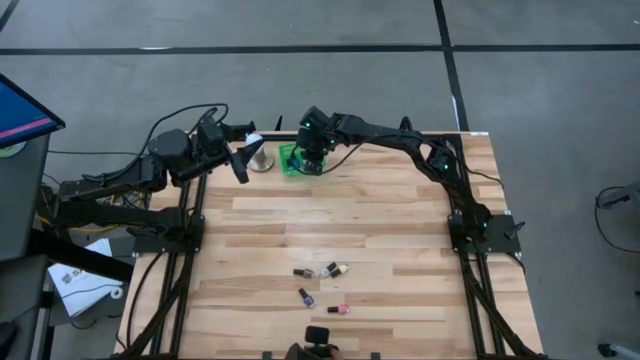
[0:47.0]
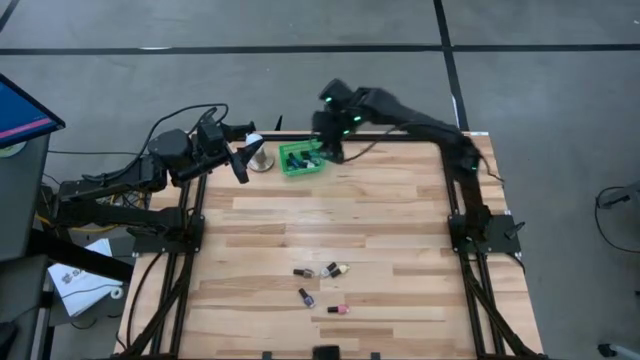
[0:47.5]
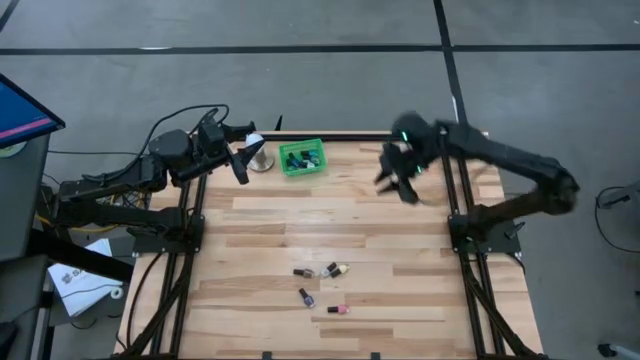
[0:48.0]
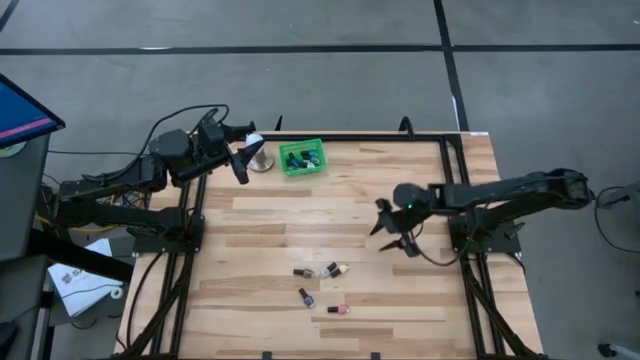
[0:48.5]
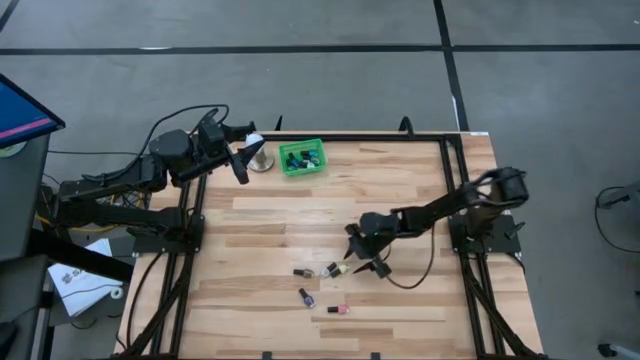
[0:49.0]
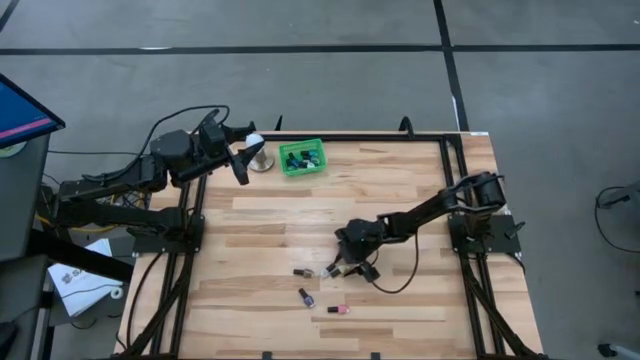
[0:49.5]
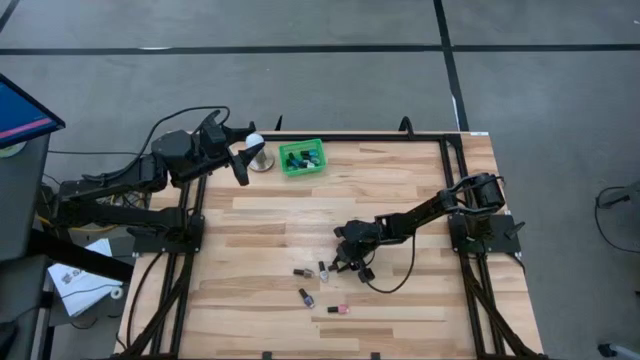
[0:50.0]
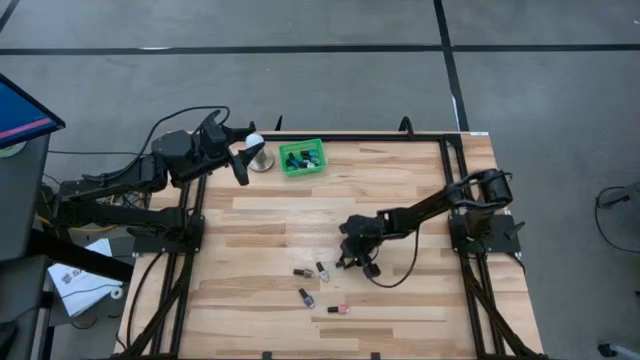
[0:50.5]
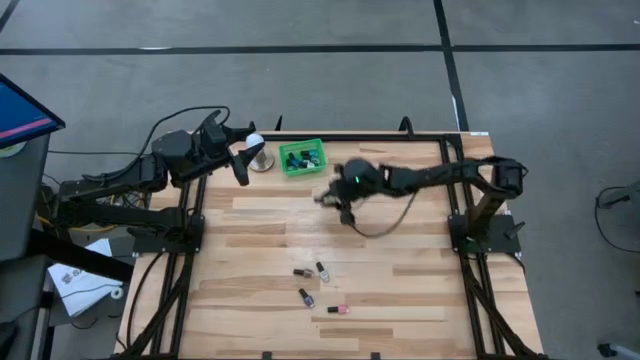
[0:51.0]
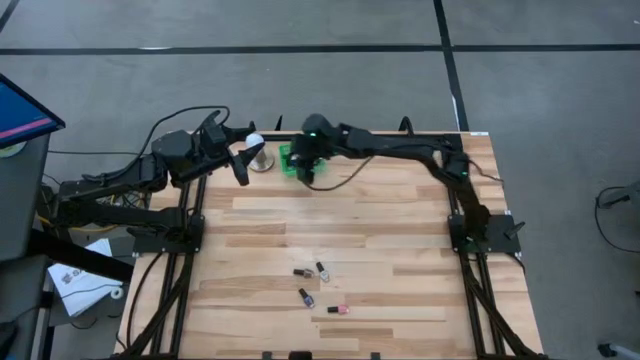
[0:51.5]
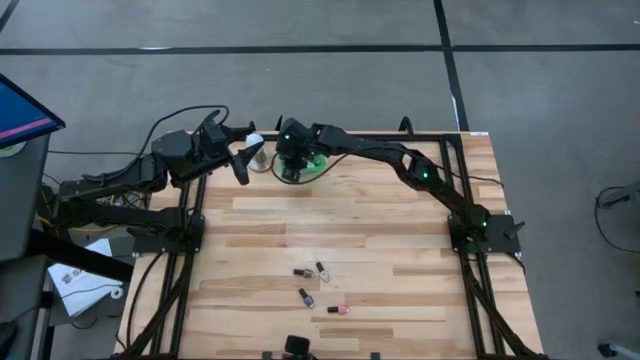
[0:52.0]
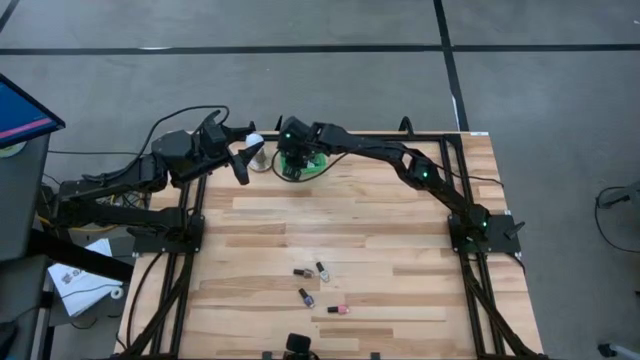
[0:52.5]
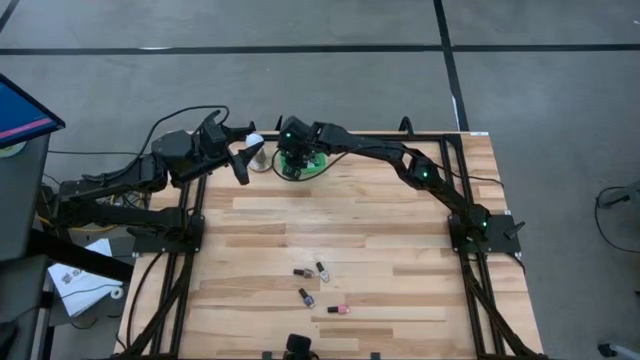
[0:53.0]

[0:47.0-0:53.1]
Task: Pick & Place Nail Polish
Put the yellow nail polish into the green bin

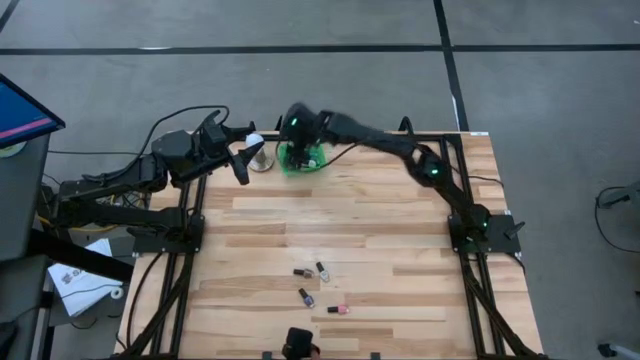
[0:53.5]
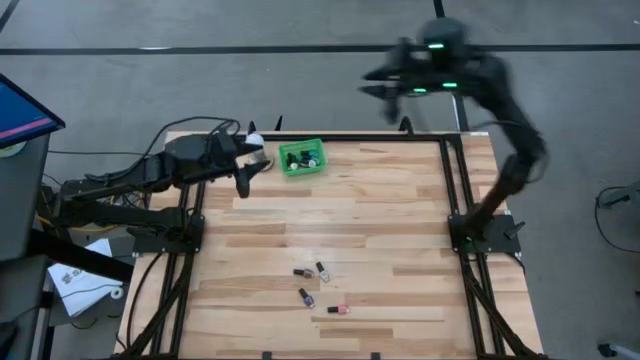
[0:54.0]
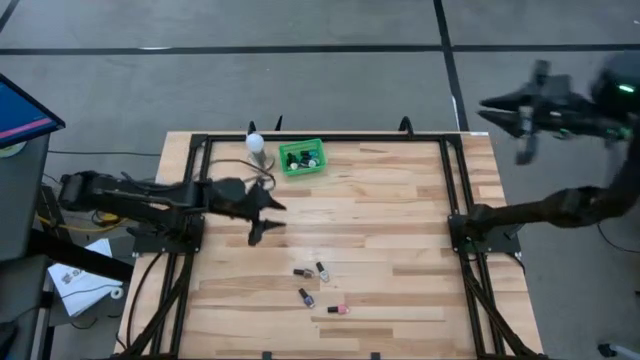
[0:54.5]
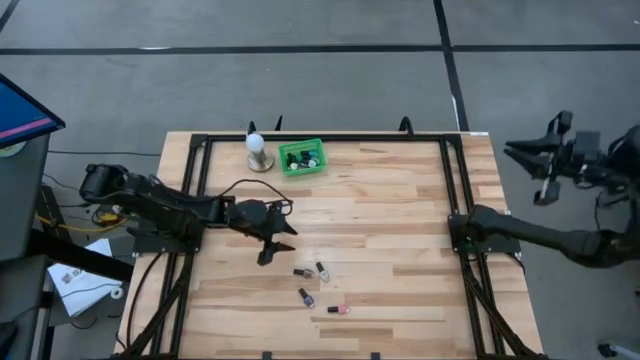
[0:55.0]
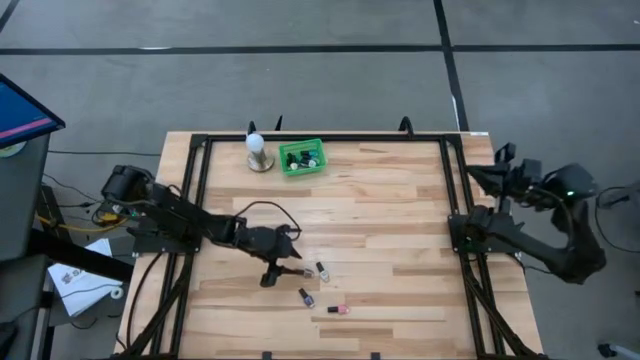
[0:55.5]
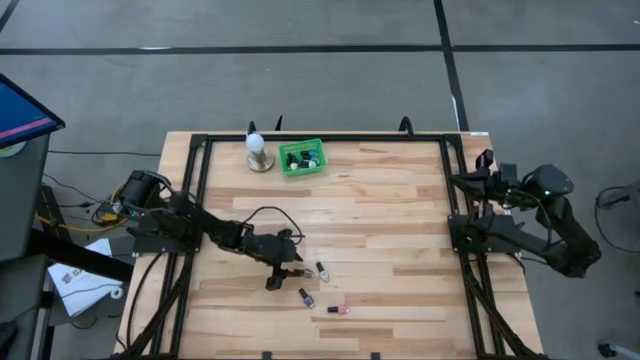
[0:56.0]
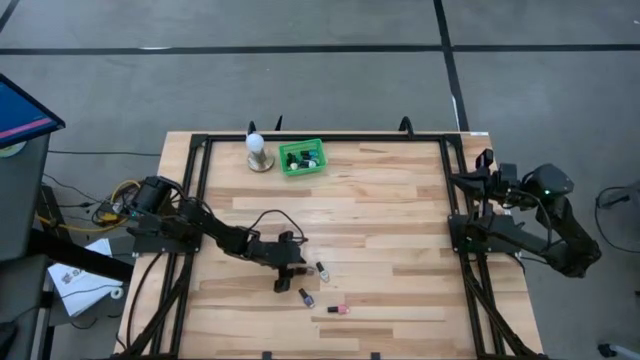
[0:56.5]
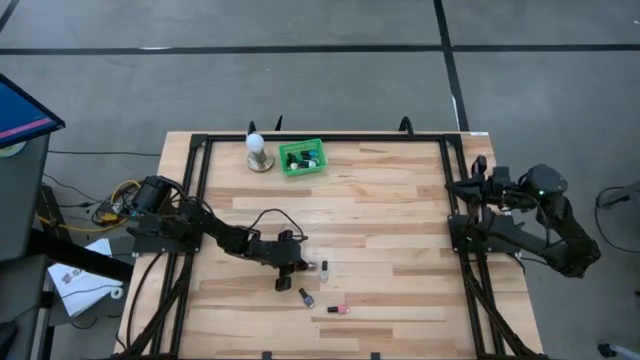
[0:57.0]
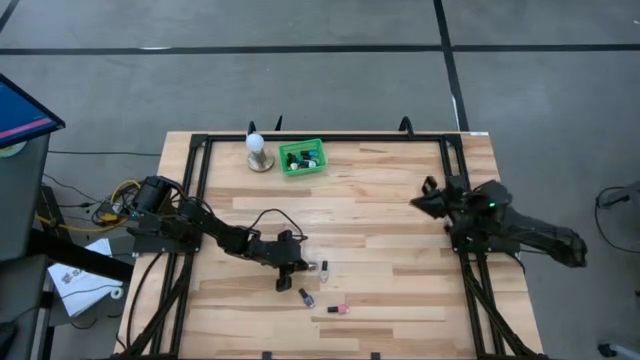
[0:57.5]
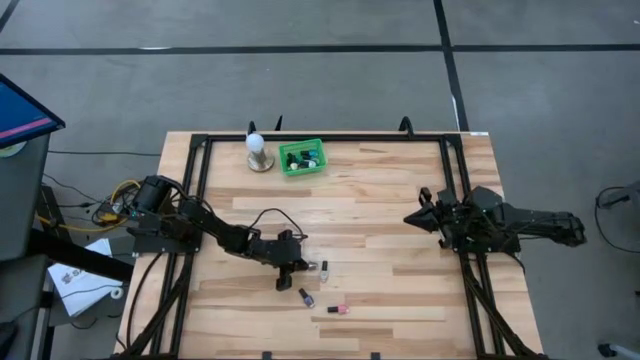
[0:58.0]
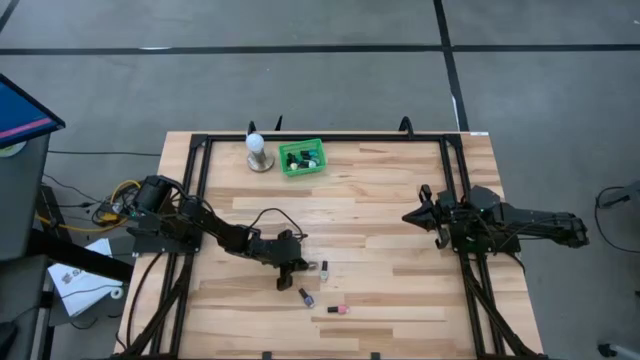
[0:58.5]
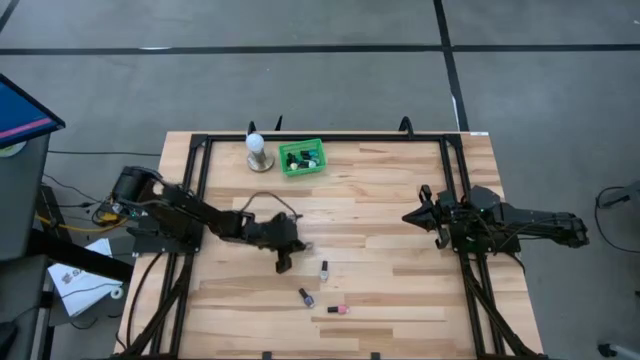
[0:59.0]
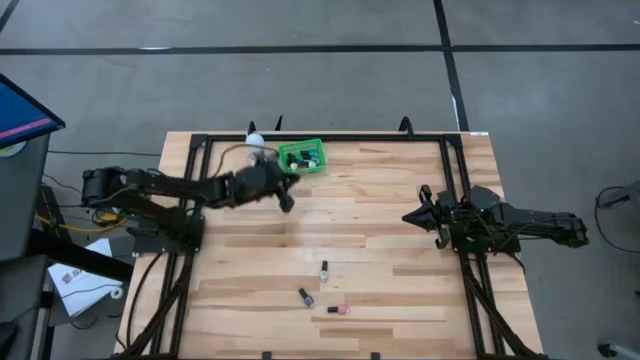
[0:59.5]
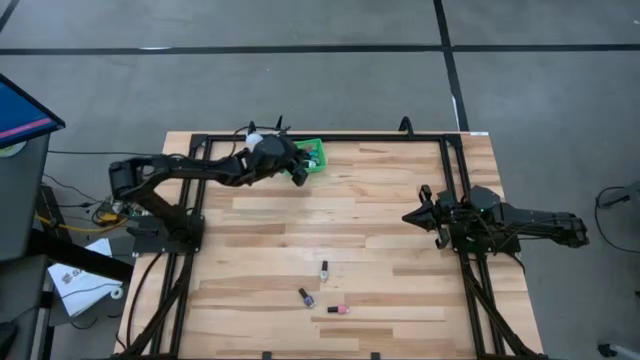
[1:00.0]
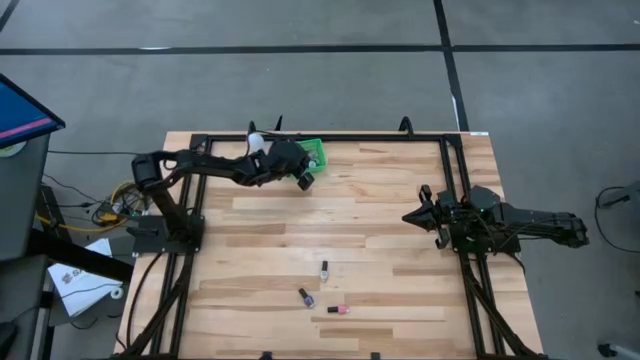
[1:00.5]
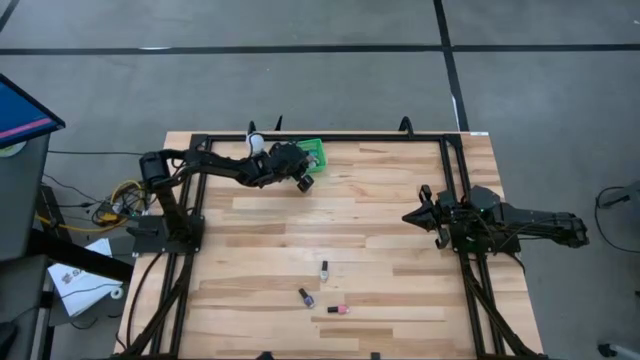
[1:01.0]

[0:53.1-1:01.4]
Put the brown nail polish into the green bin

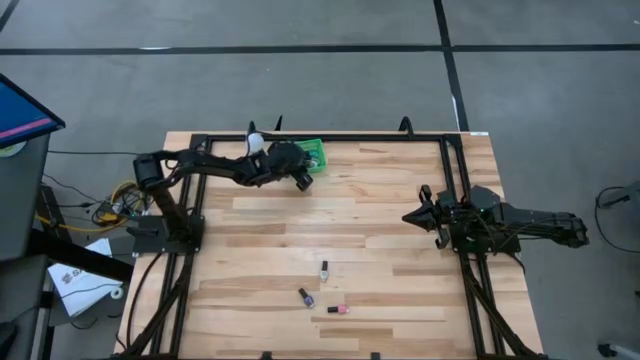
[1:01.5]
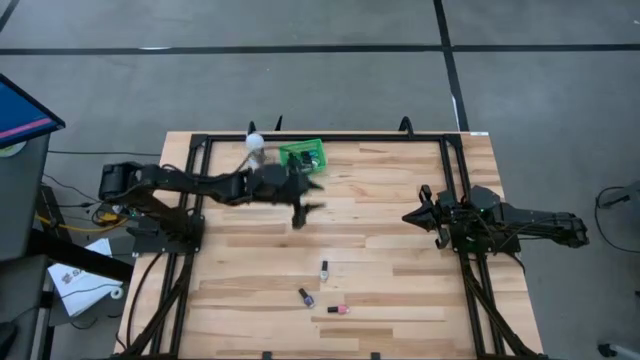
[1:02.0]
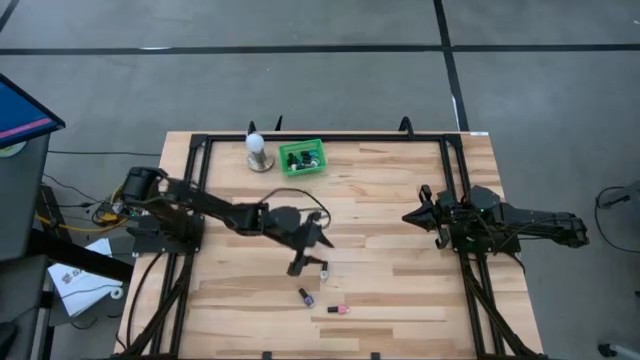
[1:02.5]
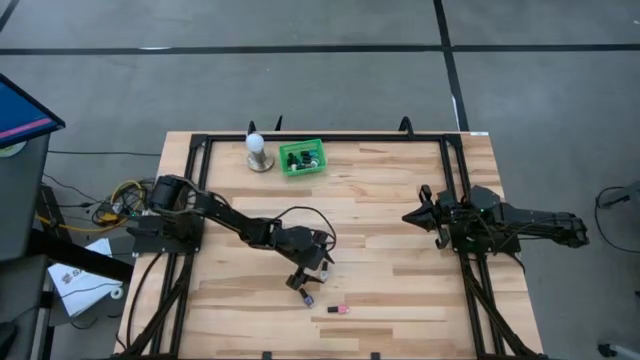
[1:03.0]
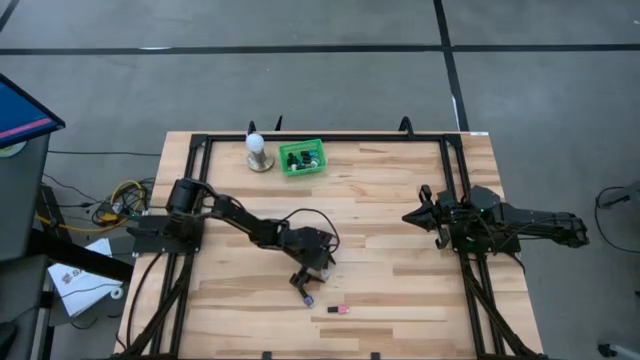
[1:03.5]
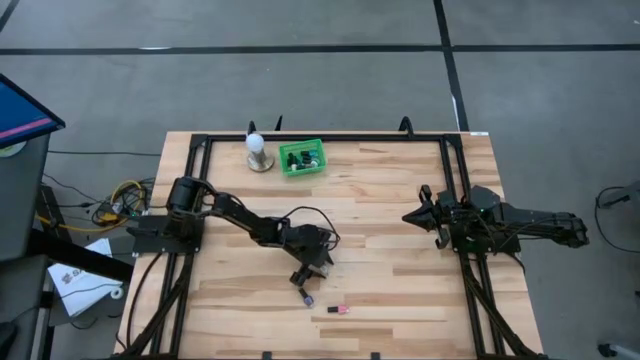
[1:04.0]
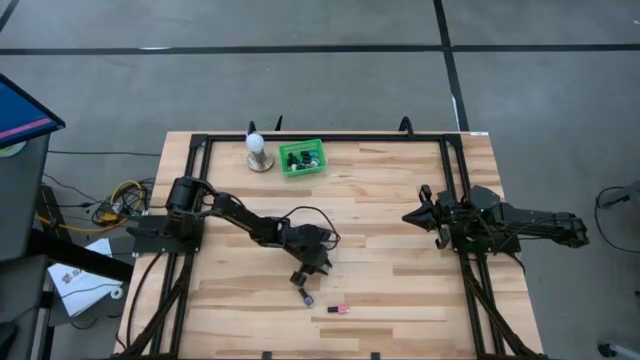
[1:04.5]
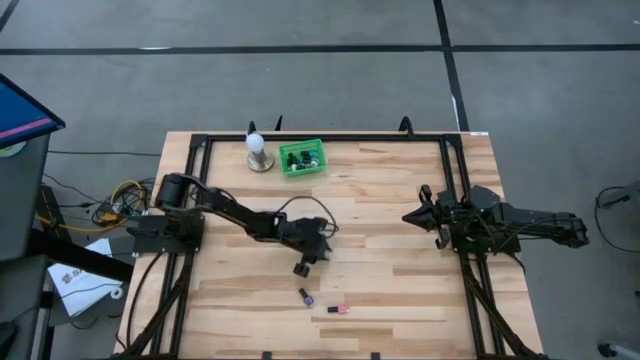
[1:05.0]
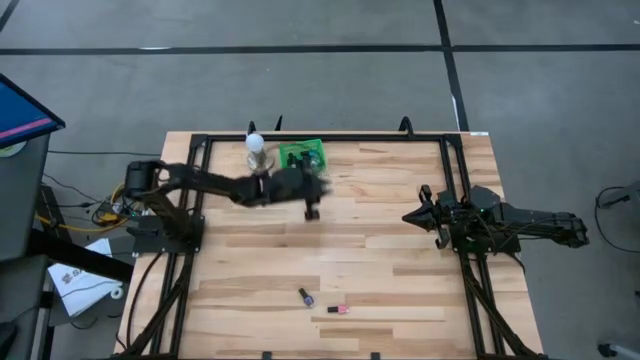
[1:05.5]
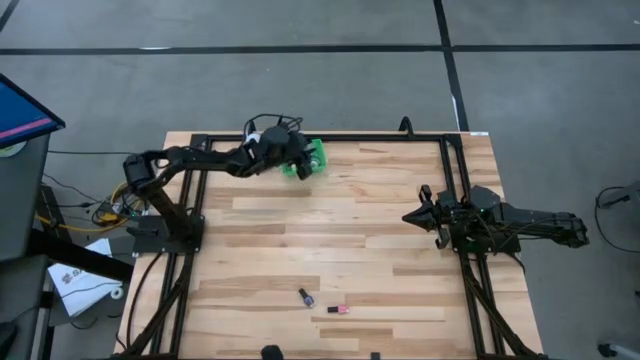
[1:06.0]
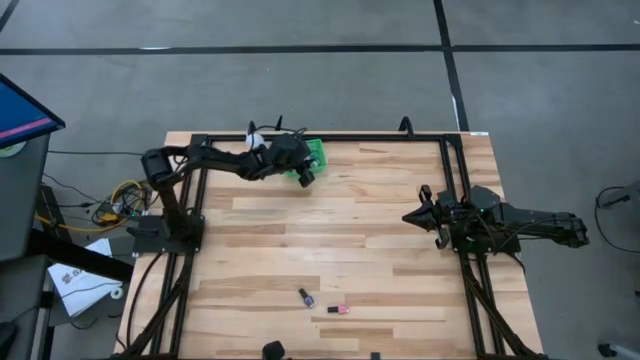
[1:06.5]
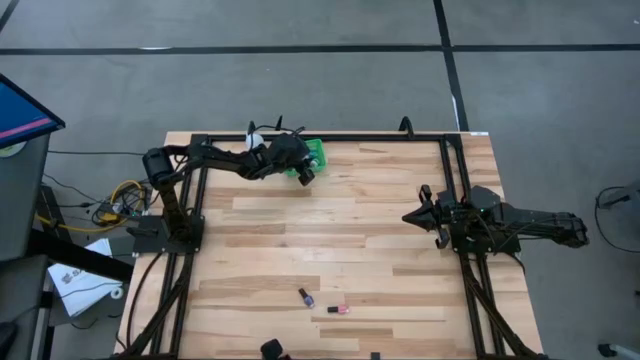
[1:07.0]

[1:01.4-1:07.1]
Put the gray nail polish into the green bin
